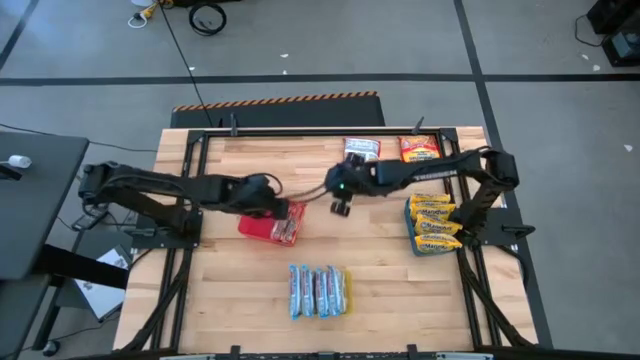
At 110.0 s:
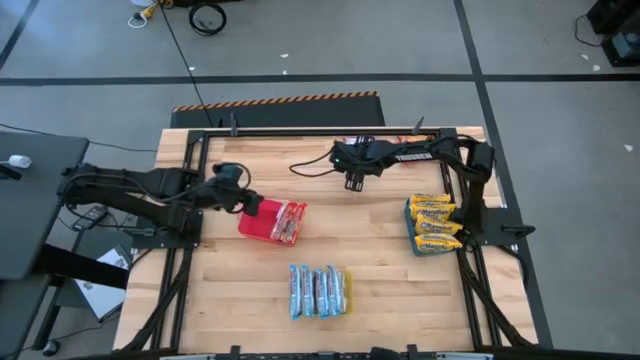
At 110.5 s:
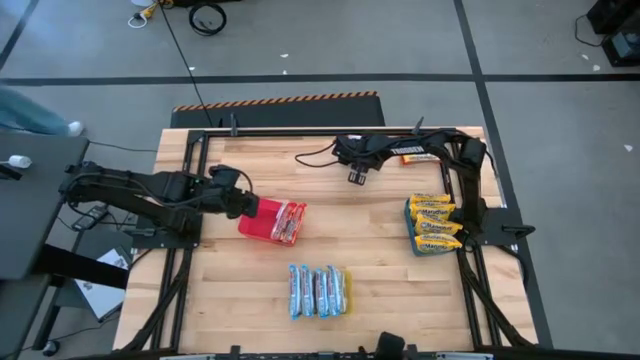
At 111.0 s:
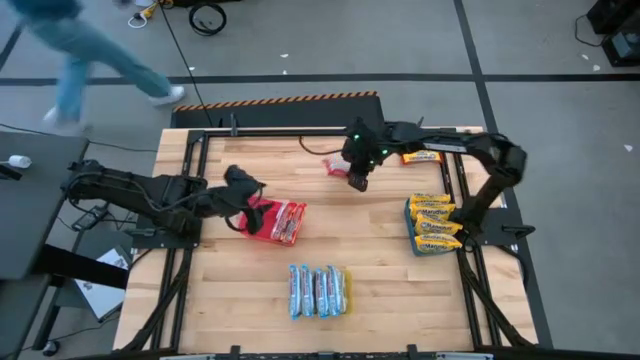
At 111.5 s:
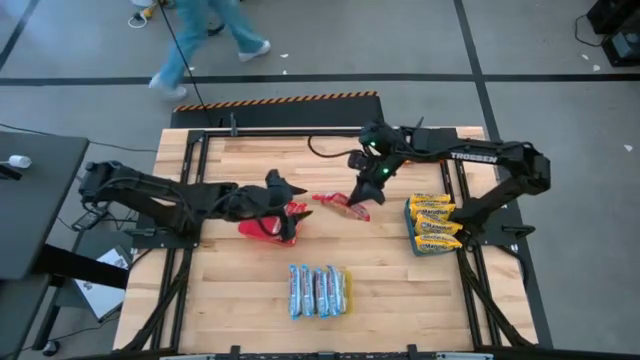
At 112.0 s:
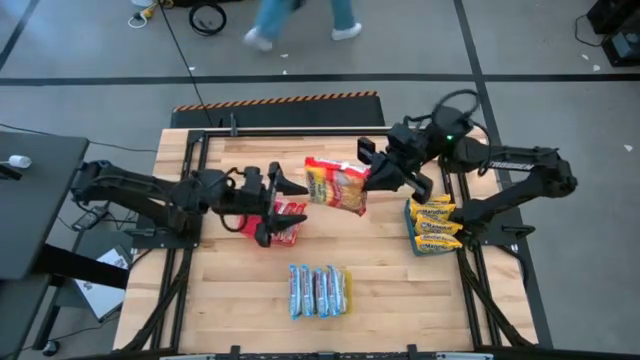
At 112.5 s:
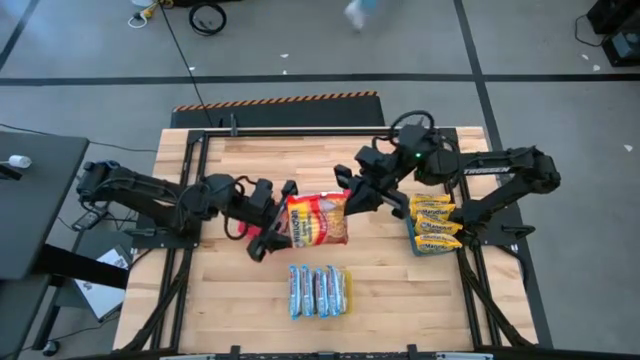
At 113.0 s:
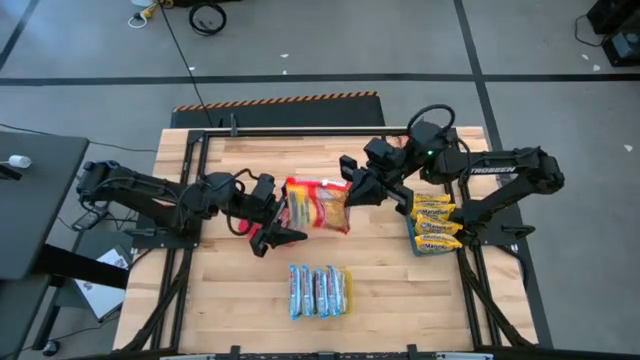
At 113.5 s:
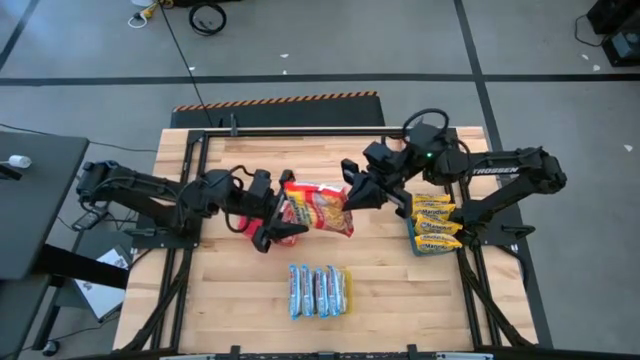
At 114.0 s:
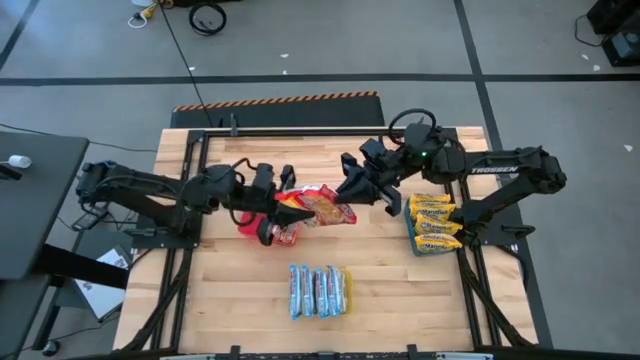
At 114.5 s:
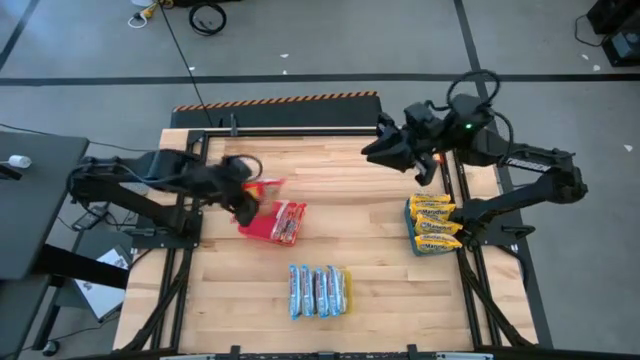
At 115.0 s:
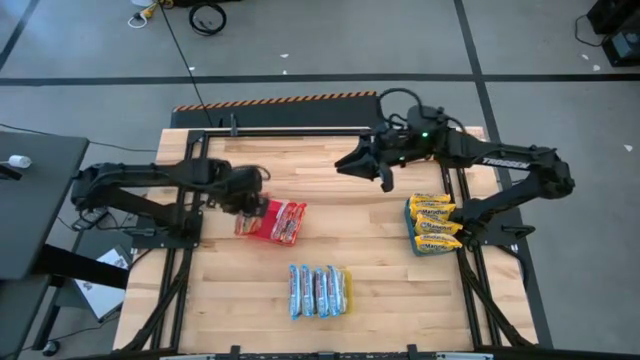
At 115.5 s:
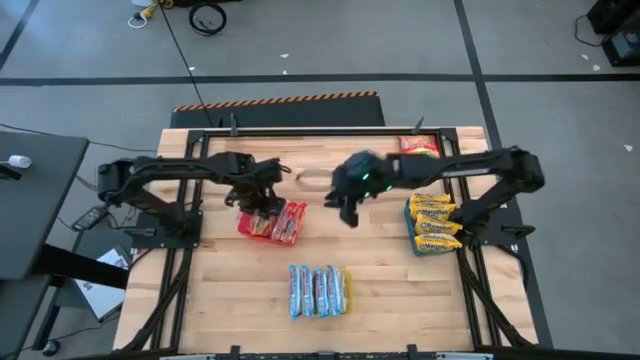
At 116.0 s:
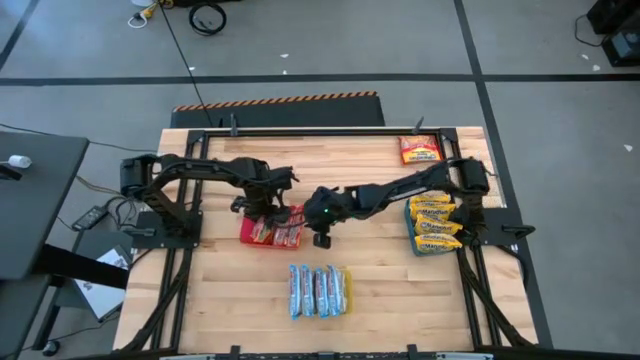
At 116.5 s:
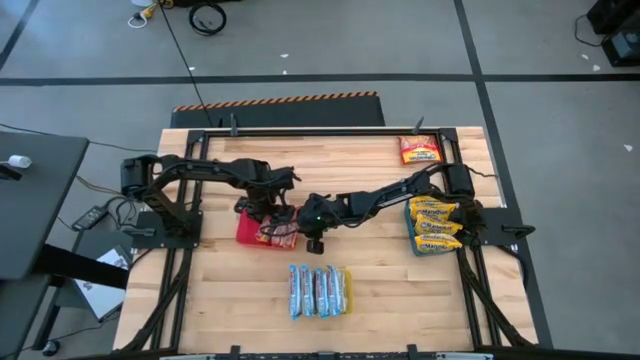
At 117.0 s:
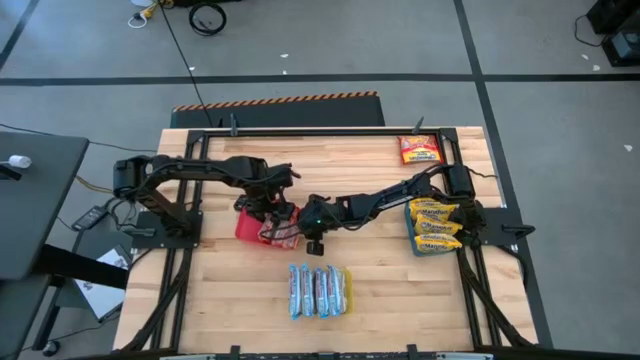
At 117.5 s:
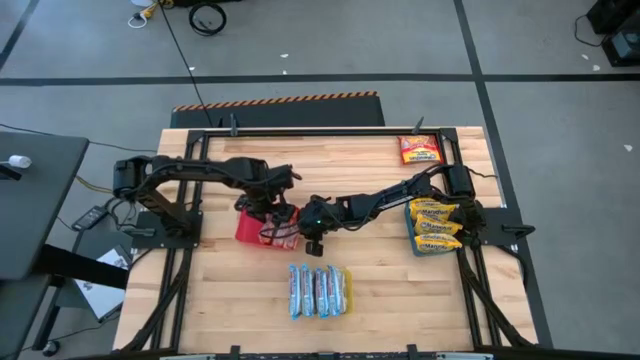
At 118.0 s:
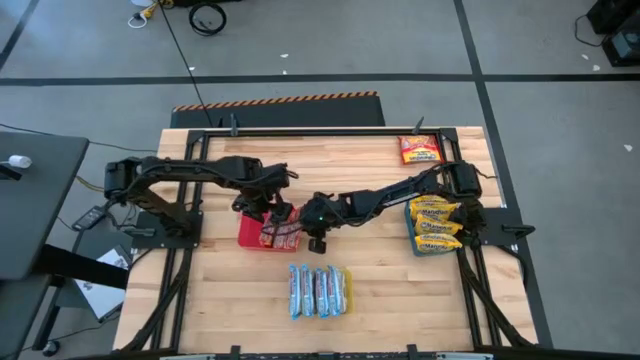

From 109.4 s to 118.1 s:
Task: Sort Maruchan noodles
Put the red noodle pack into the red bin

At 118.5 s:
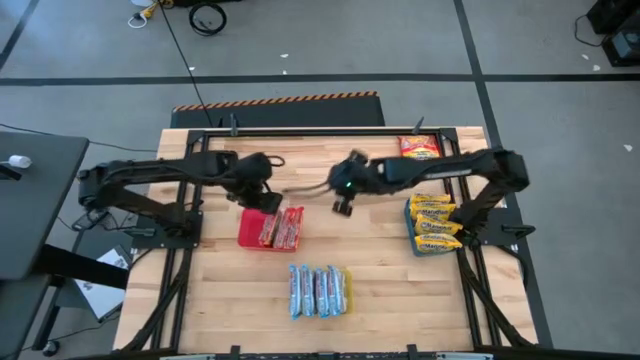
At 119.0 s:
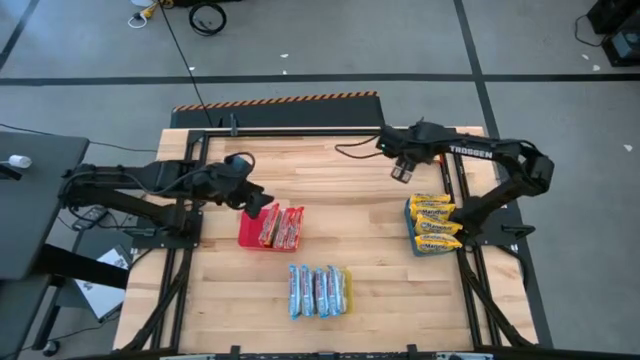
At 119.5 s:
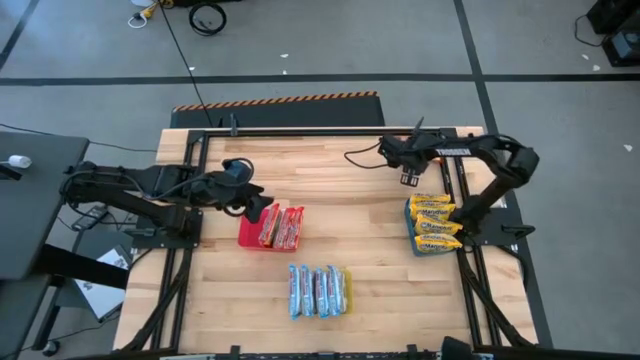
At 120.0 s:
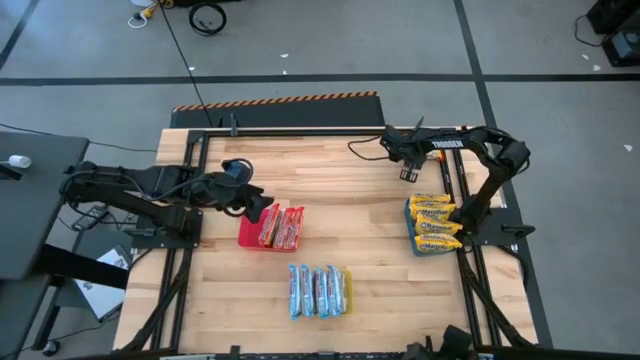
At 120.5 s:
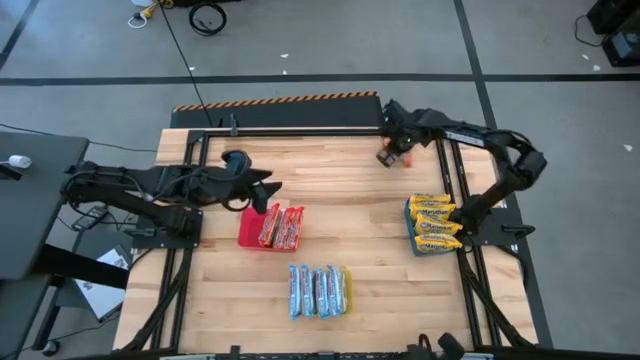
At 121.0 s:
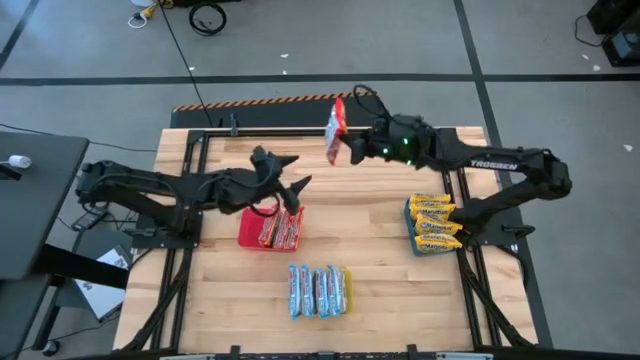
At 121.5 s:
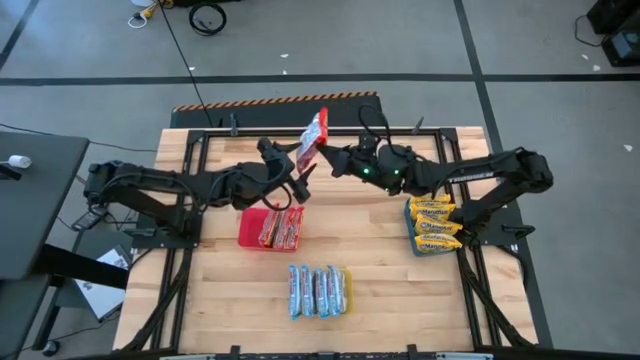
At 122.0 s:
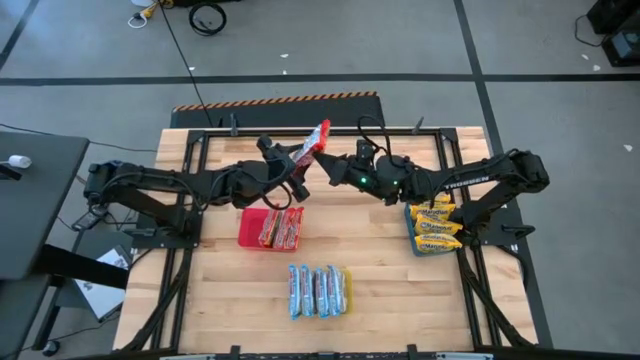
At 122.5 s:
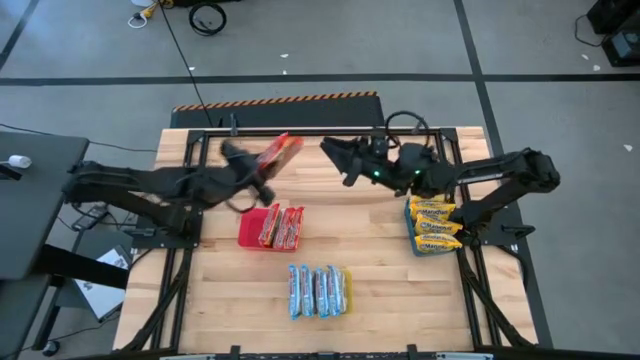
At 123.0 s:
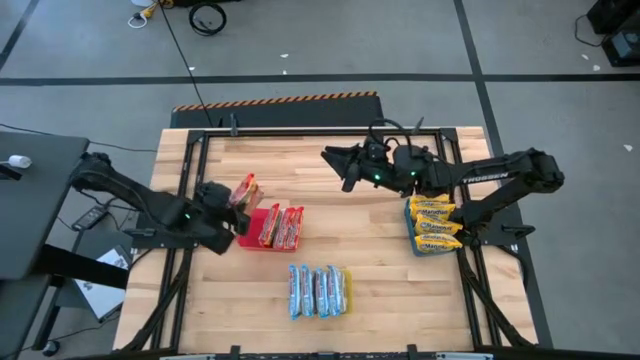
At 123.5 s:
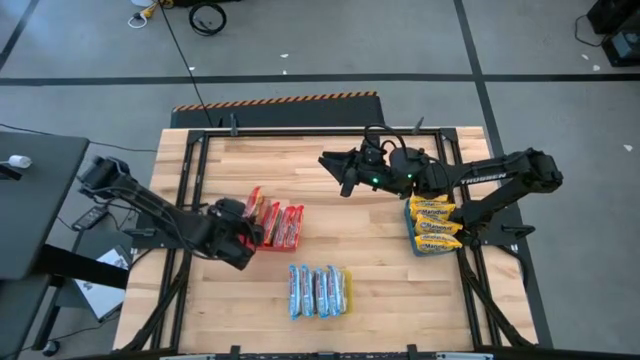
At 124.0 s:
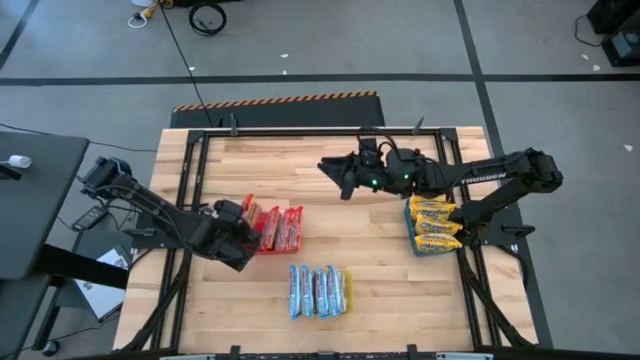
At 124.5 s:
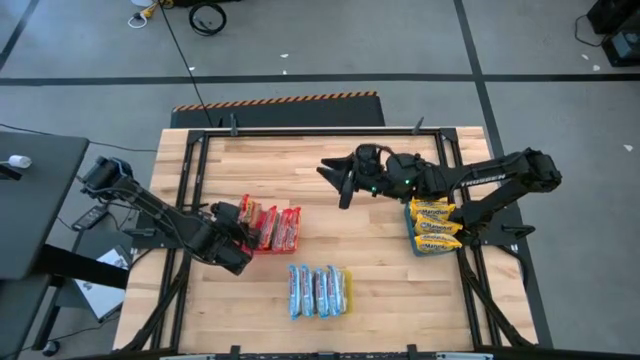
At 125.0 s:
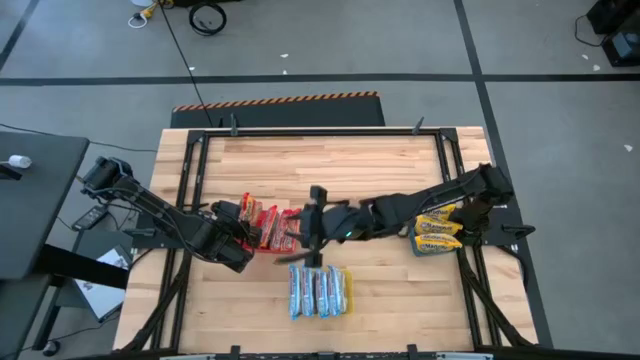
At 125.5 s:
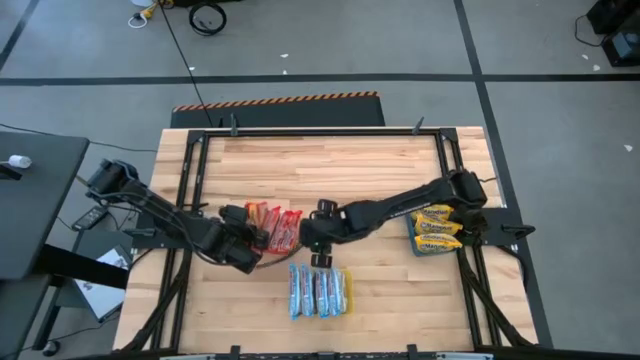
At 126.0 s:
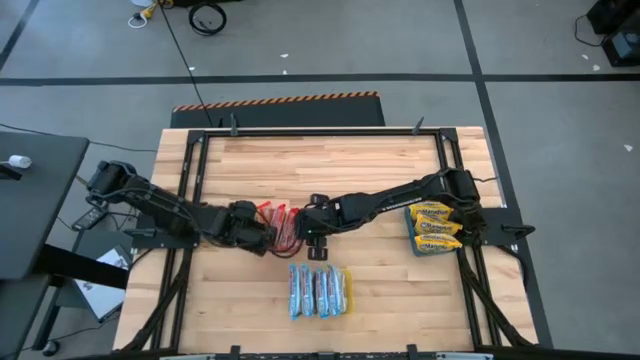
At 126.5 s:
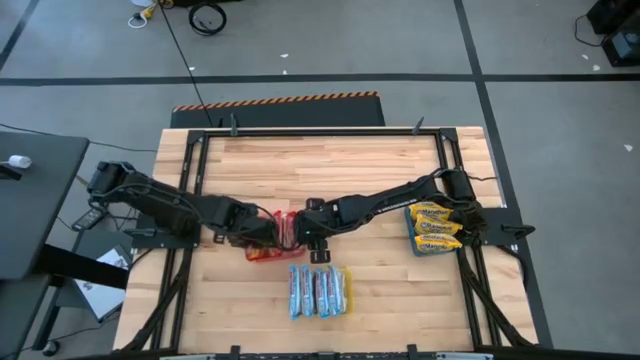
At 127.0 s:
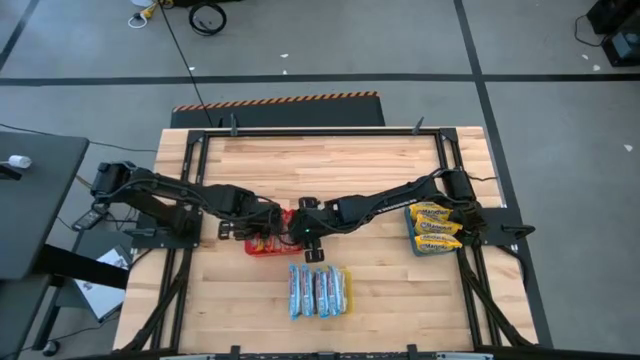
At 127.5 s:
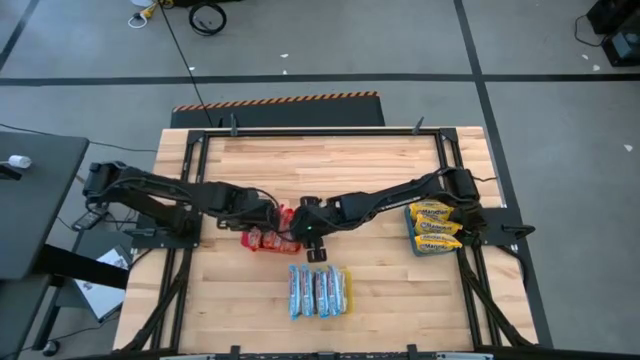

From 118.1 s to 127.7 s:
Put the red noodle pack into the red bin

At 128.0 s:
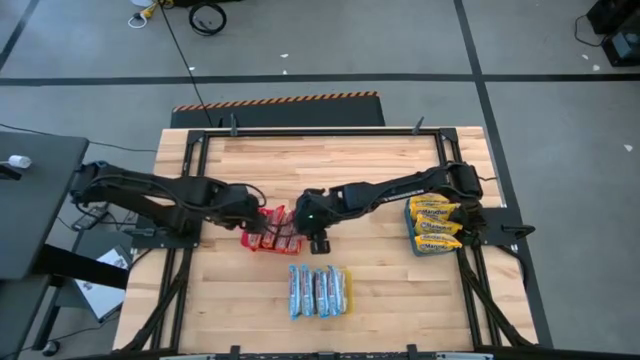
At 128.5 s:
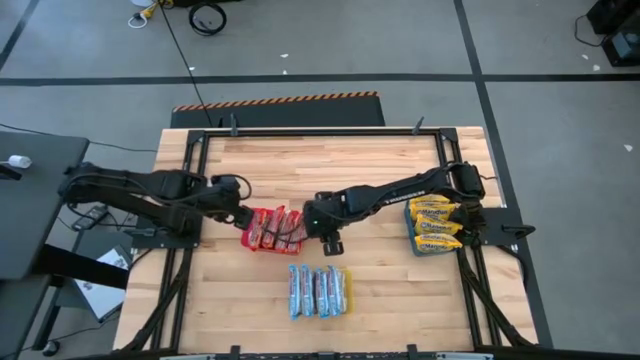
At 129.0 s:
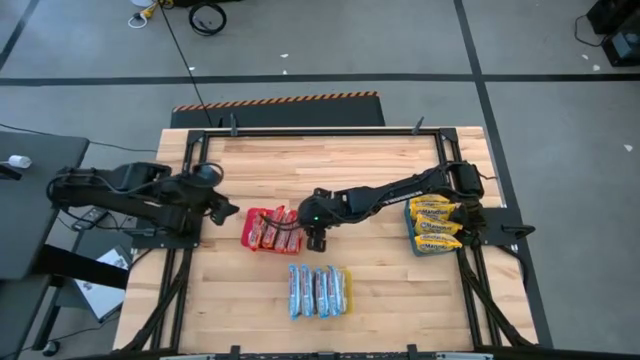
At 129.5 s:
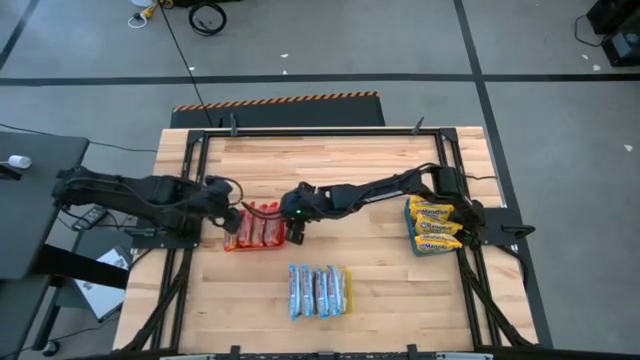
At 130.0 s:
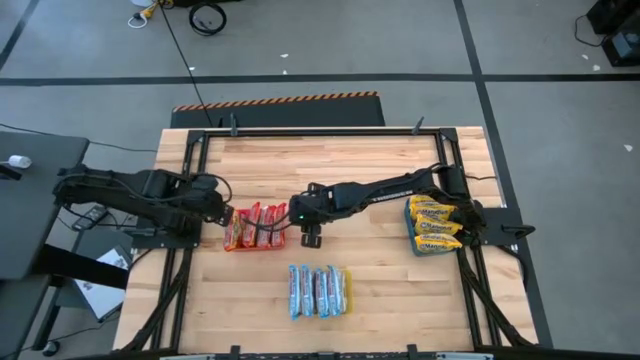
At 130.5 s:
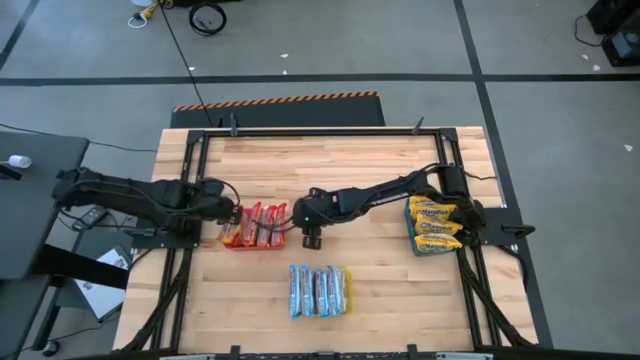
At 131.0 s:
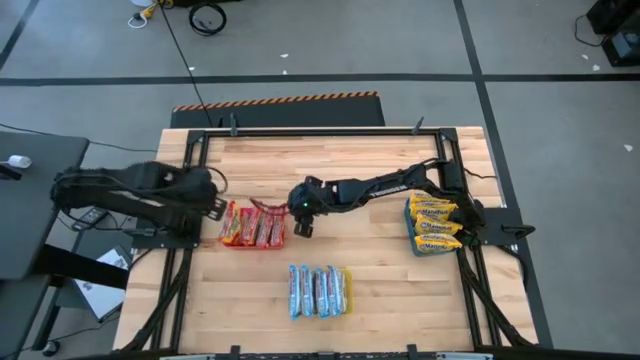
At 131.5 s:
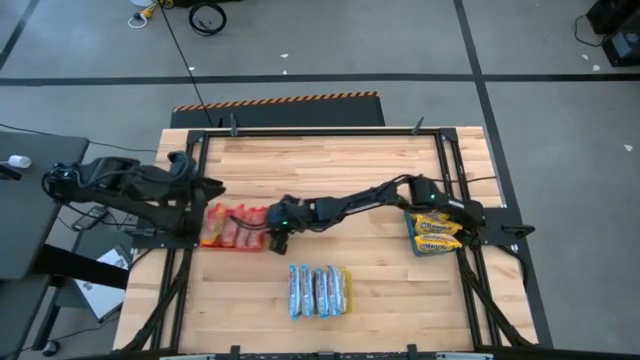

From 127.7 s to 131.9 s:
Adjust the red bin
